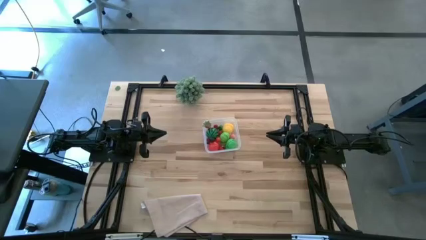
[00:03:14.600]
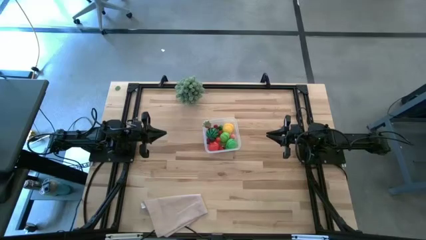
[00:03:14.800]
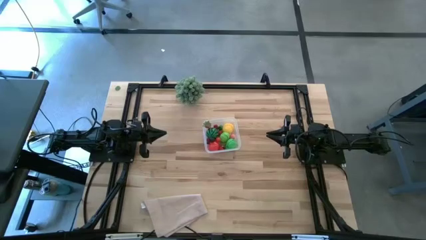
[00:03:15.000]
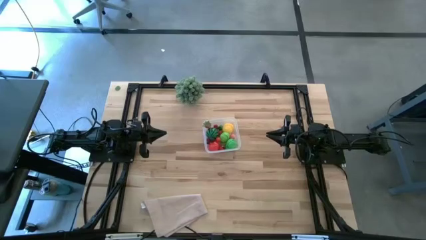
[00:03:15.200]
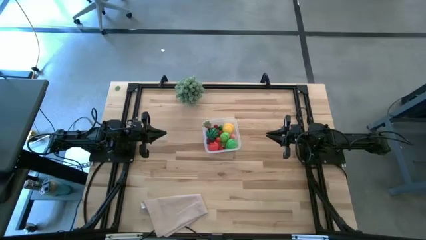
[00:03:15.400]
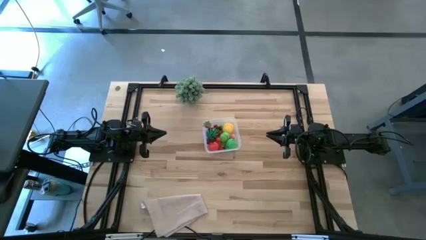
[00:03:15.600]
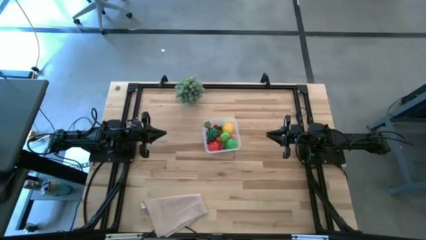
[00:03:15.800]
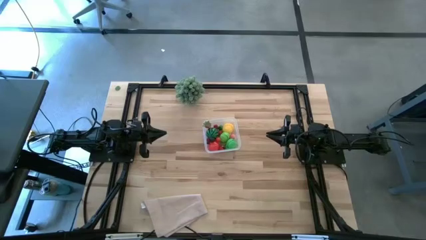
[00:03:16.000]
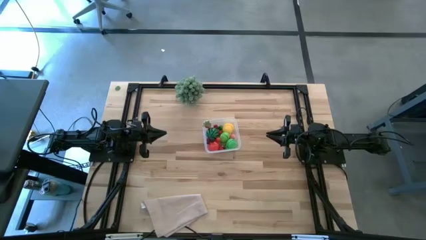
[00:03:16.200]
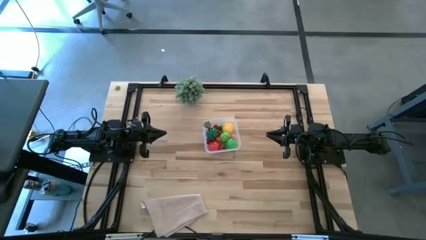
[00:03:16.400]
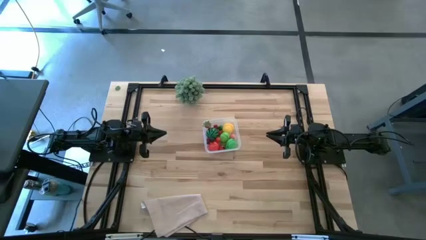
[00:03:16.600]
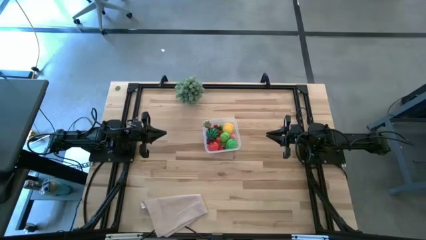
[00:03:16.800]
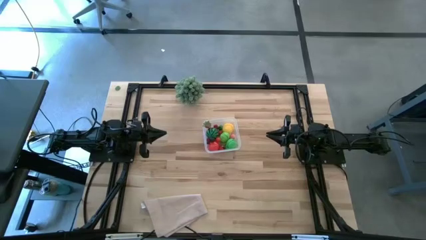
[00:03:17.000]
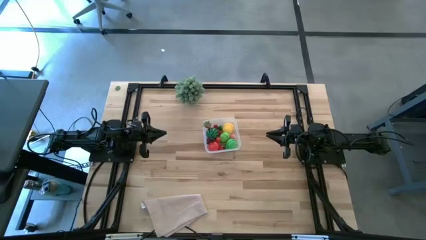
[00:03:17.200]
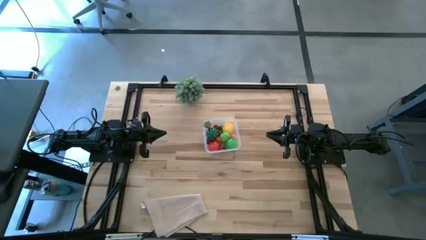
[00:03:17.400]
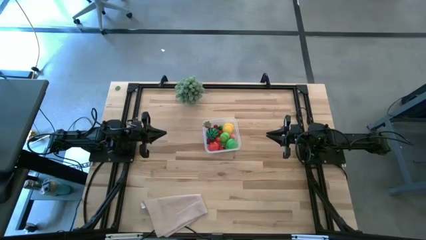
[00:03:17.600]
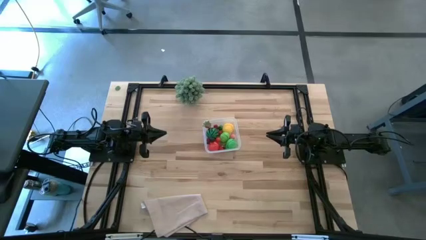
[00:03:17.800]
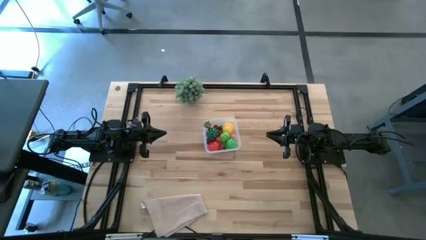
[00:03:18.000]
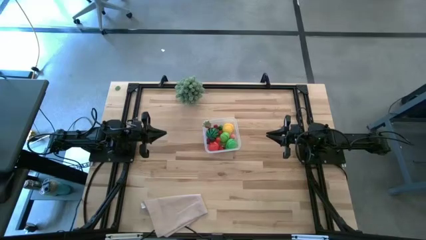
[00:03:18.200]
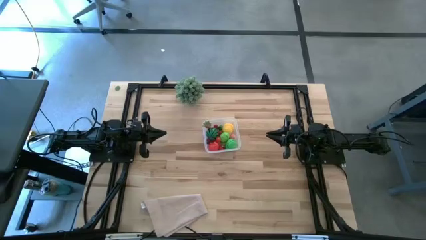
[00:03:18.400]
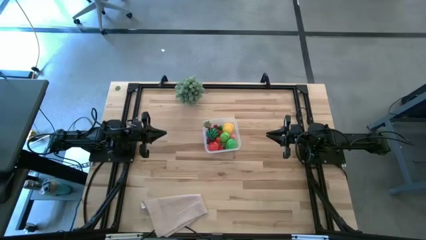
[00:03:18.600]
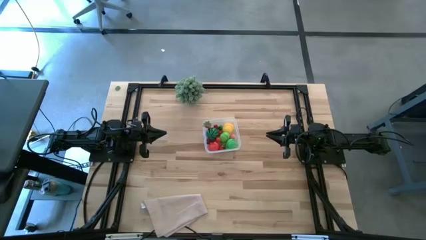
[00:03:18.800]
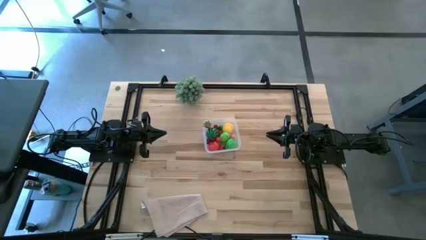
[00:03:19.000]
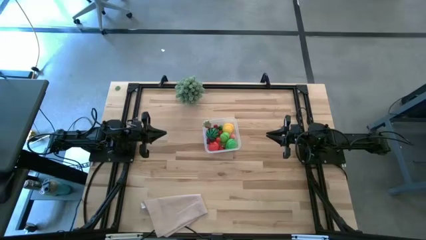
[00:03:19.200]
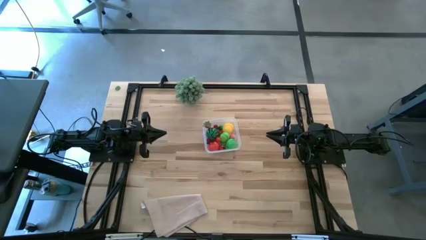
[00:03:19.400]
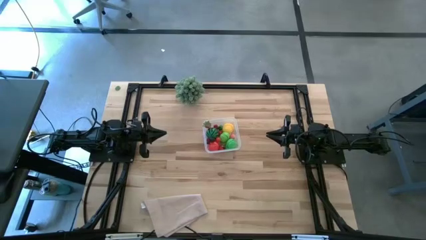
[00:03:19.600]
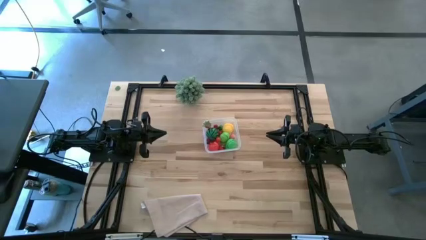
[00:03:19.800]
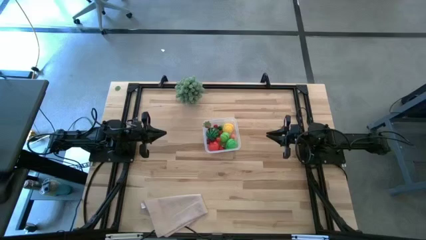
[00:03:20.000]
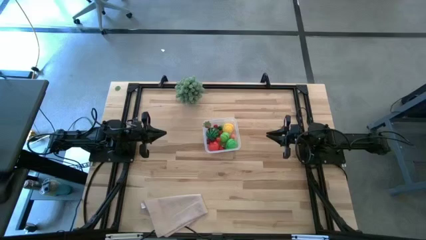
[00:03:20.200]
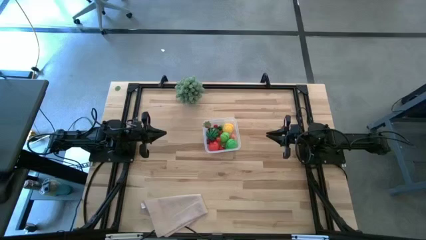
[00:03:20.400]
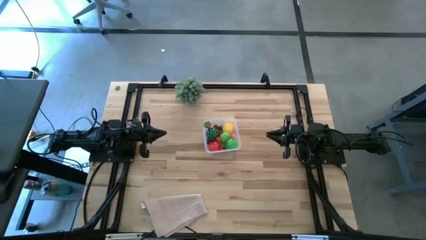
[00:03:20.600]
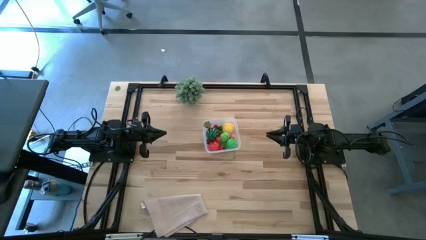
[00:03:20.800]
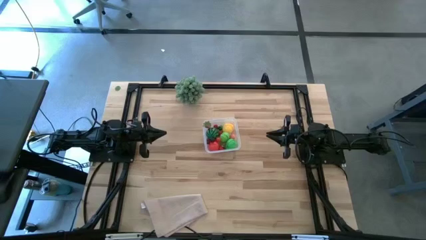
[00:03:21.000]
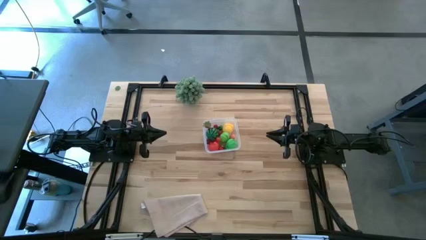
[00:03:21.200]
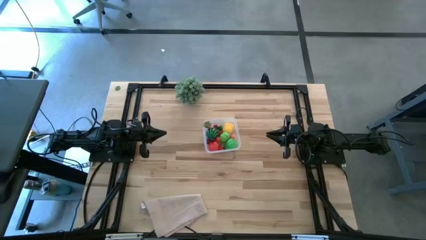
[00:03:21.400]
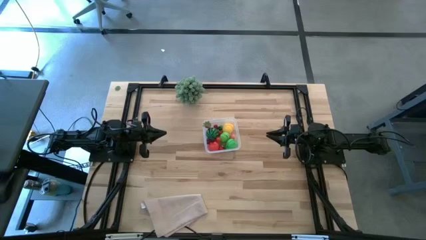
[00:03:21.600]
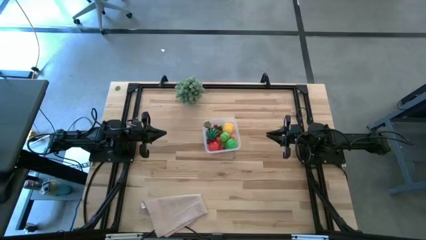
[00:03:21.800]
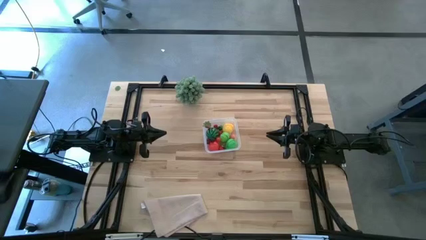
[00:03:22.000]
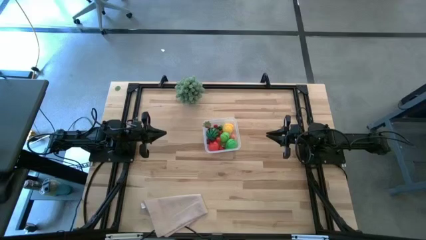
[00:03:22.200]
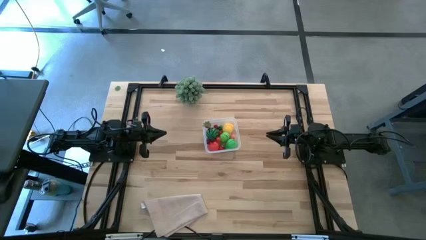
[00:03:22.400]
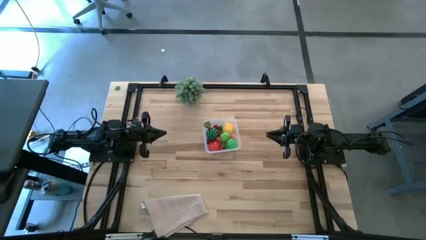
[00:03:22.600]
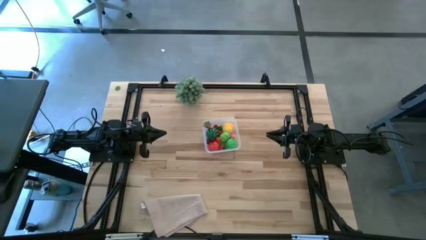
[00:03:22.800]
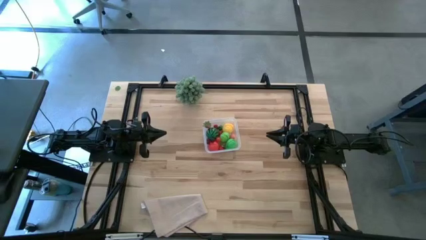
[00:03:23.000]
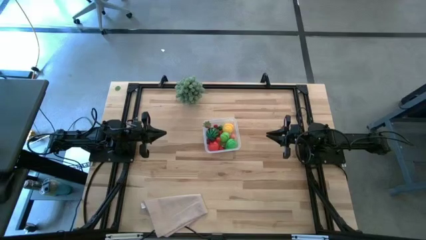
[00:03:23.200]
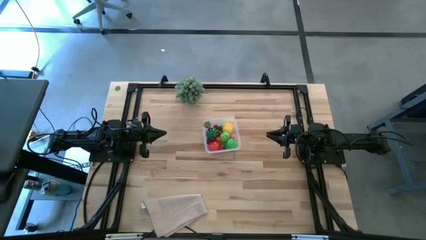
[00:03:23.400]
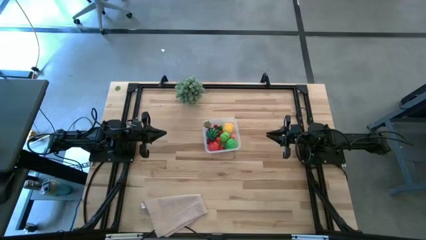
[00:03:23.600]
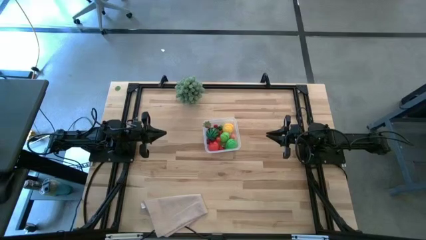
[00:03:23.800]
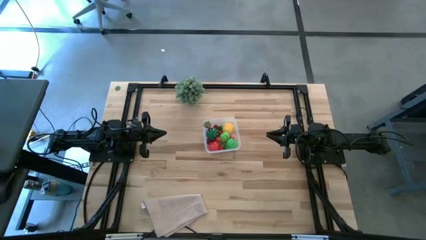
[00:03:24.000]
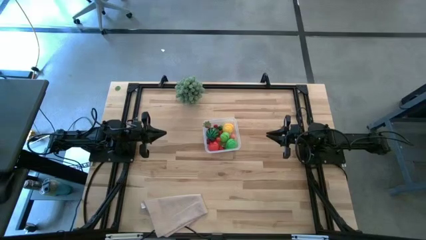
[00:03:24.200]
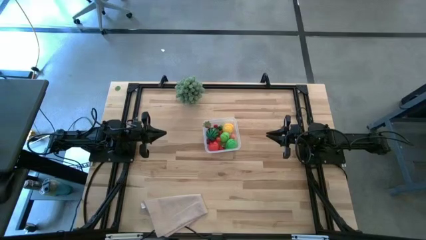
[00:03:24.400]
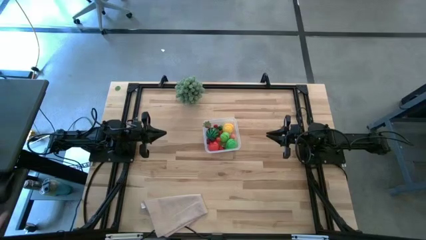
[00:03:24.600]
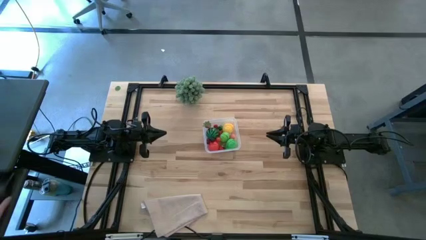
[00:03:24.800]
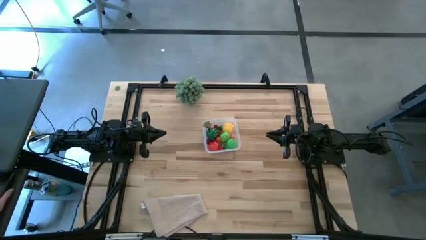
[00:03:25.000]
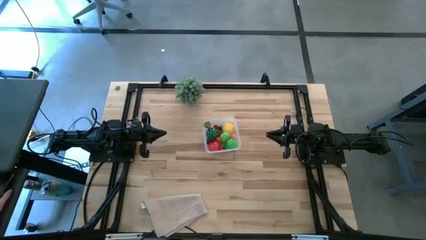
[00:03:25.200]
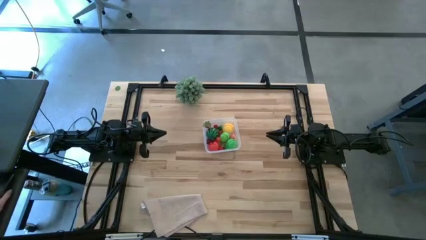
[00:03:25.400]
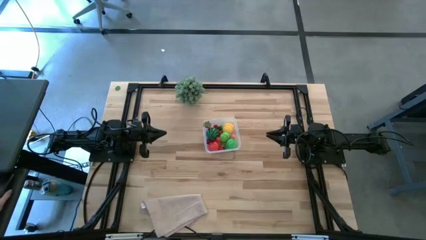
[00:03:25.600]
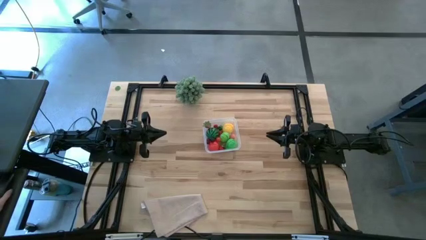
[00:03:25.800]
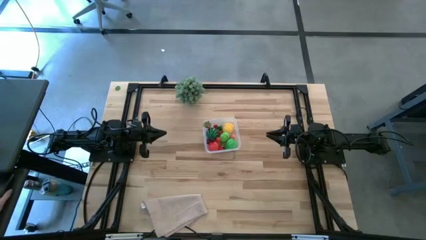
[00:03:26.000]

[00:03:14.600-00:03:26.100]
Task: Pick and placing Produce into tupperware
Return to Home Position

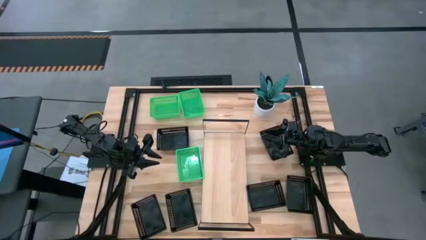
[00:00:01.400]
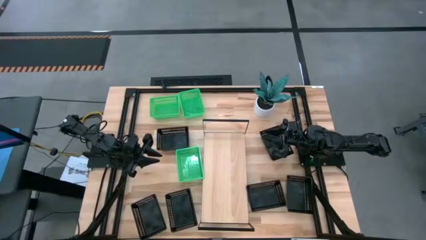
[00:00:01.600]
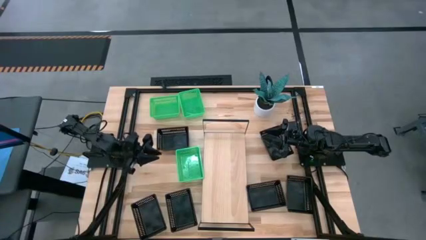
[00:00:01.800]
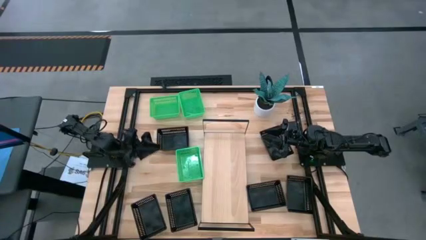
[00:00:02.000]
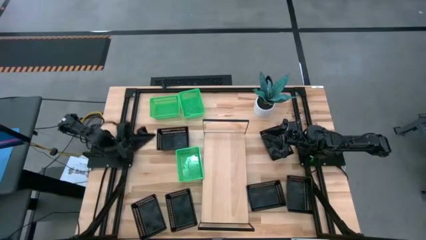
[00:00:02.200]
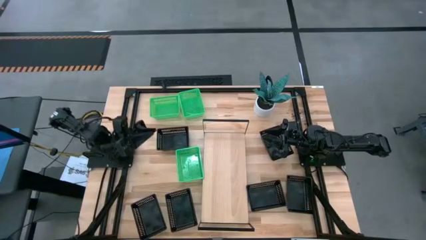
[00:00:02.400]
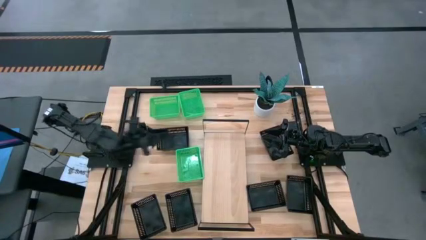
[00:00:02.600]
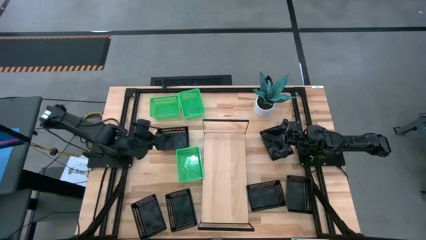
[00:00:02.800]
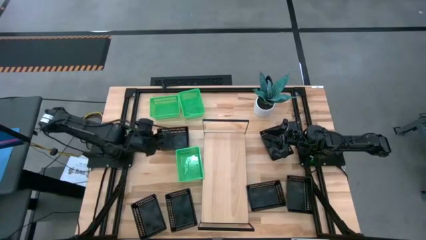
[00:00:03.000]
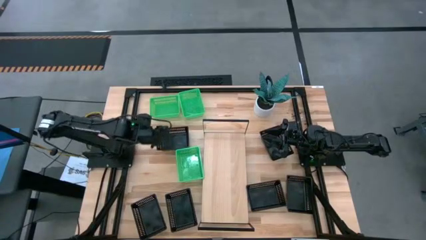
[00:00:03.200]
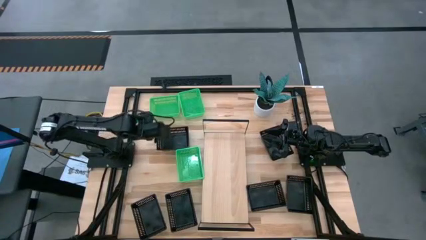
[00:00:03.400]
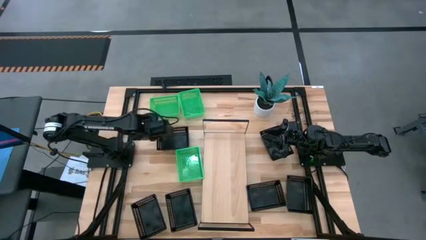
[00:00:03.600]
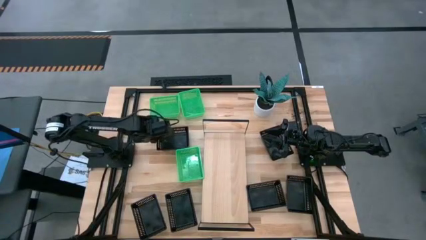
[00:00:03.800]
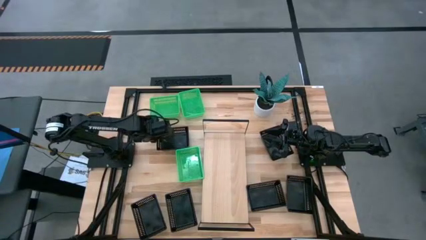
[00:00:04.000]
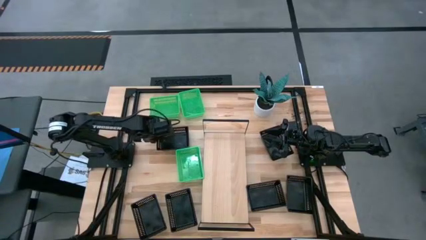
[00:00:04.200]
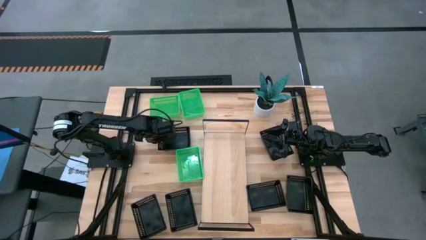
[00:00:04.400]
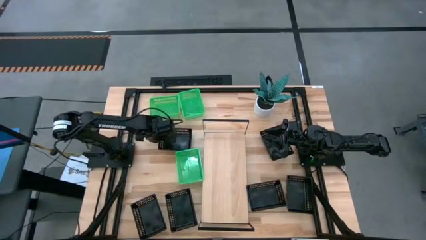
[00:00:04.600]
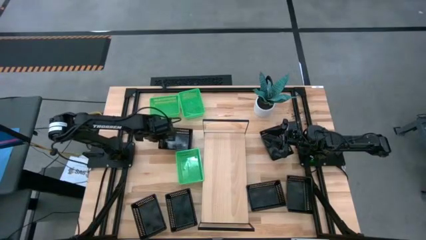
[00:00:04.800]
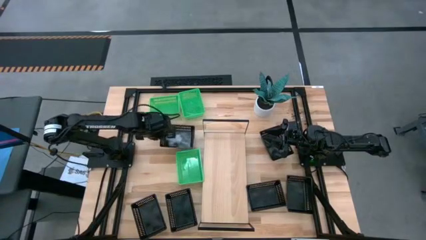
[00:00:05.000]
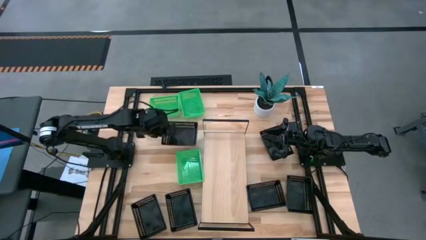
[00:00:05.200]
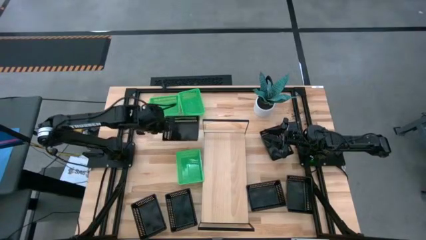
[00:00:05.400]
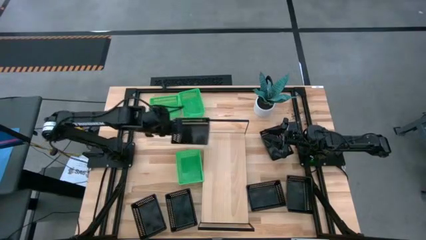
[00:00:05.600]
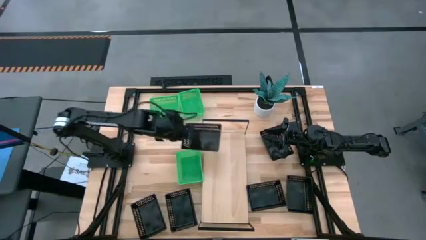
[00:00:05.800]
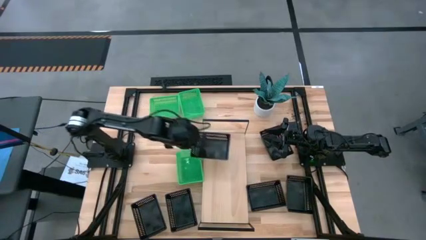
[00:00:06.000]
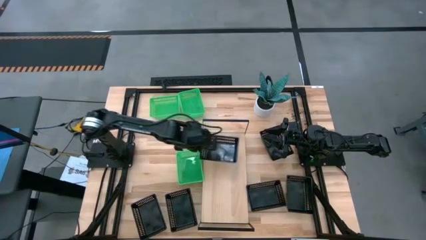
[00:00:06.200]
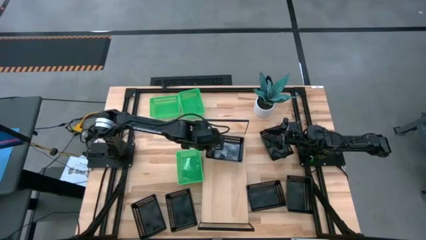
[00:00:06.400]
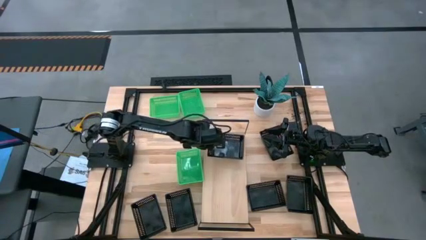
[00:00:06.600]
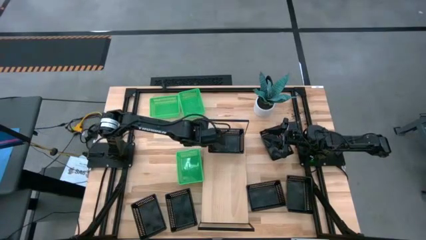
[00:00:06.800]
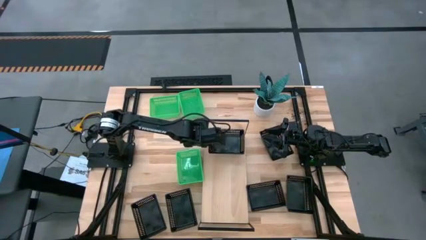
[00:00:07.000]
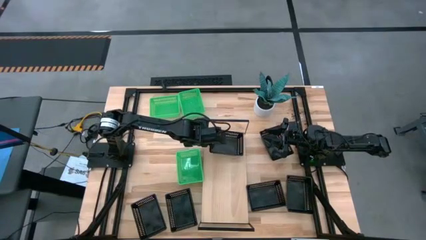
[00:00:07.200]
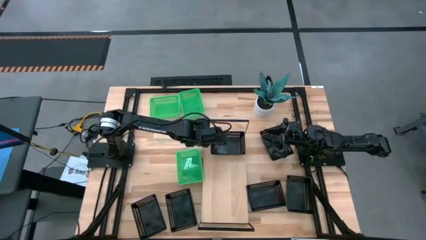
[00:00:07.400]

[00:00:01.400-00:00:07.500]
Task: Stack baskets on shelf by color
Put the black bin on the shelf
